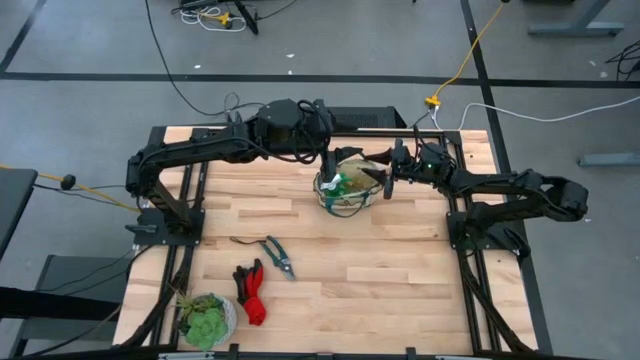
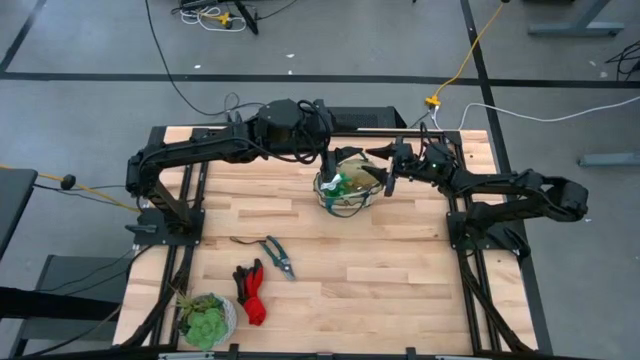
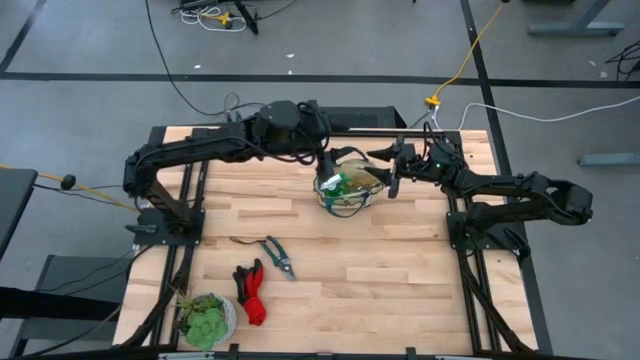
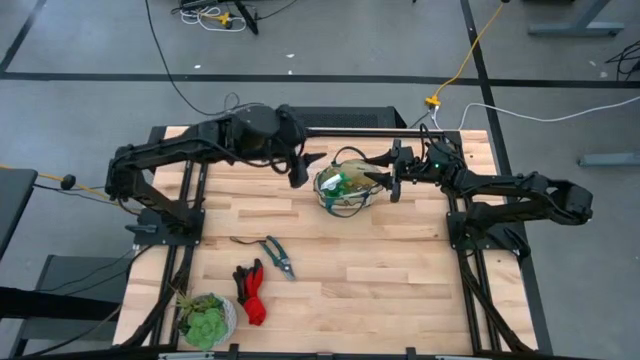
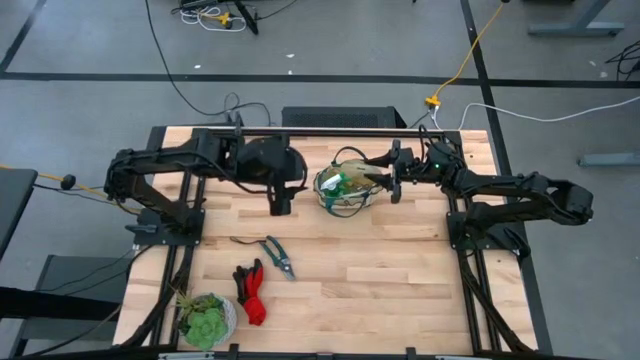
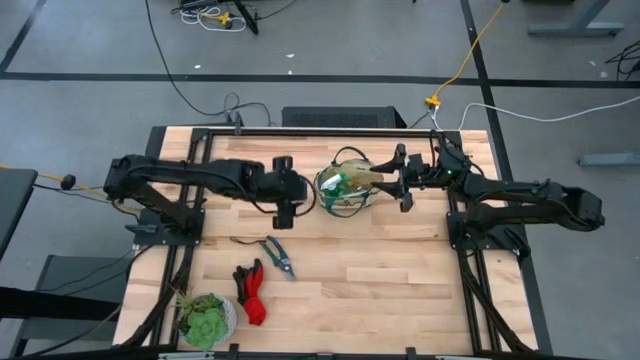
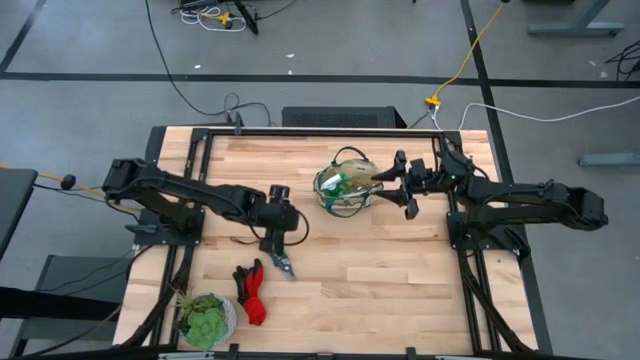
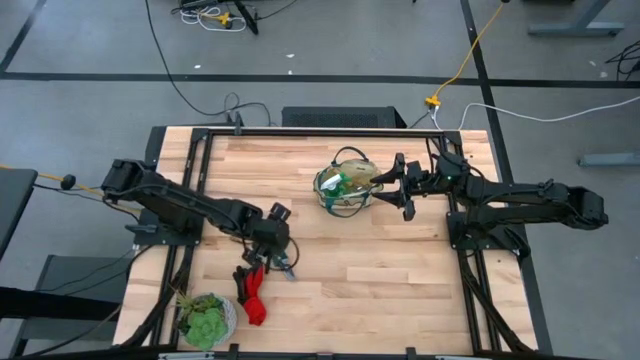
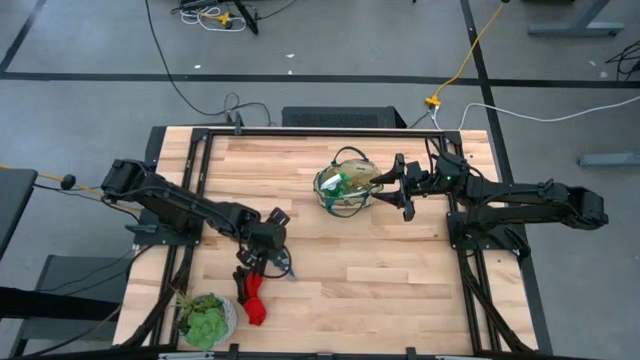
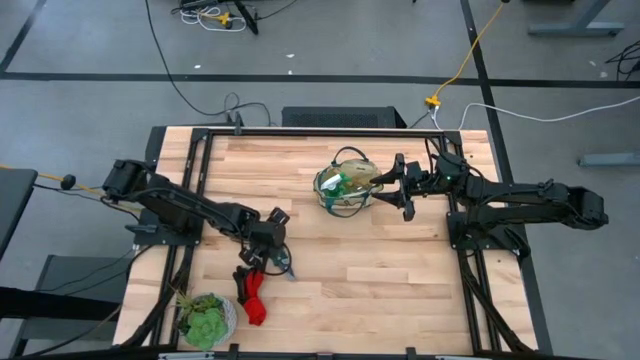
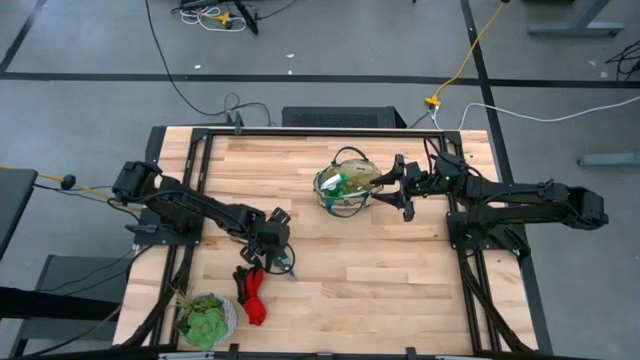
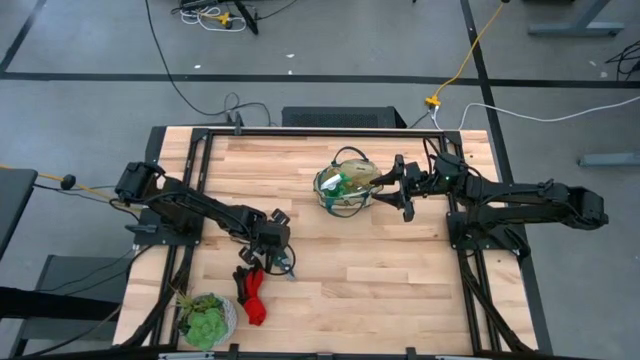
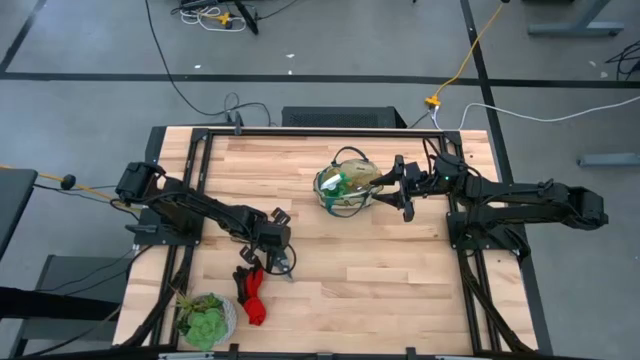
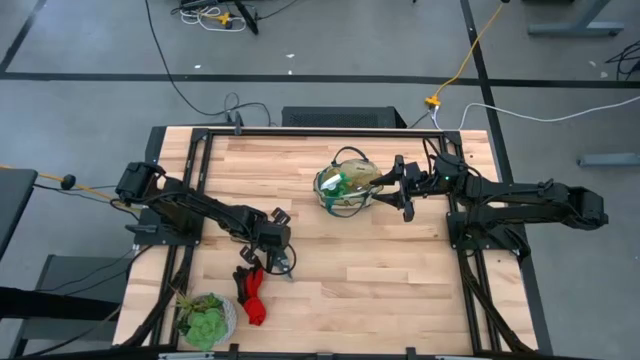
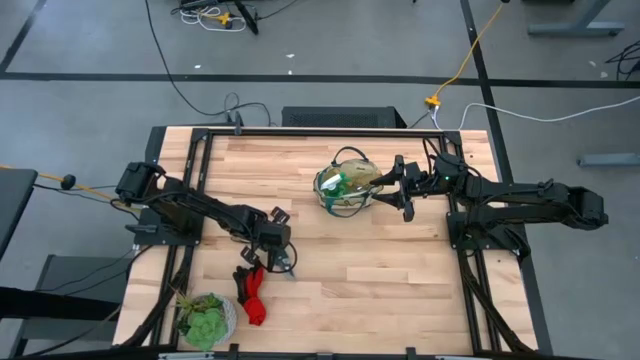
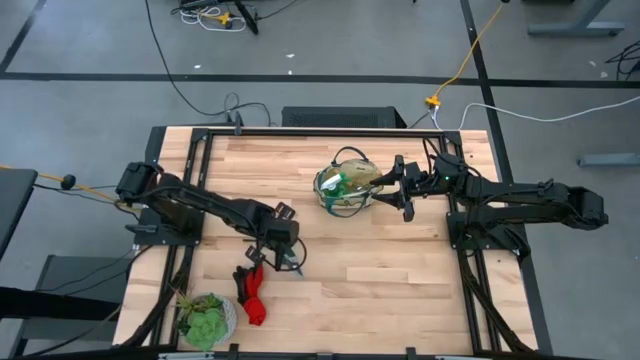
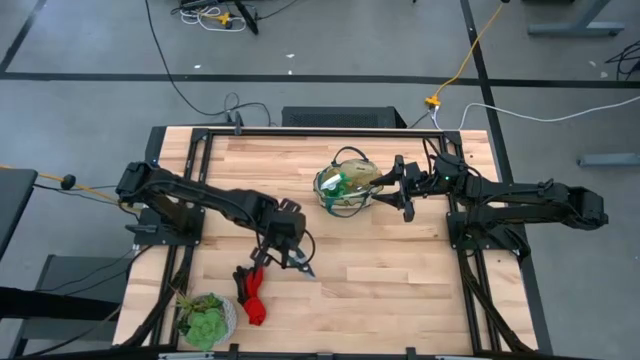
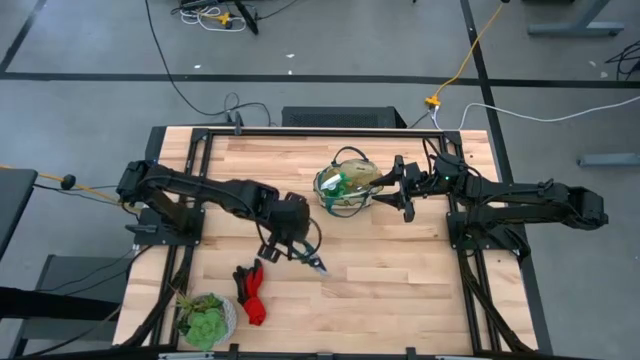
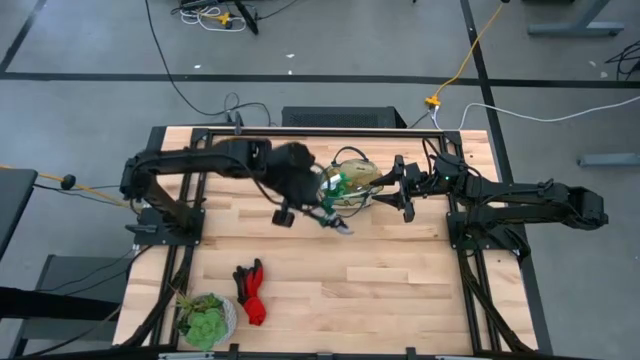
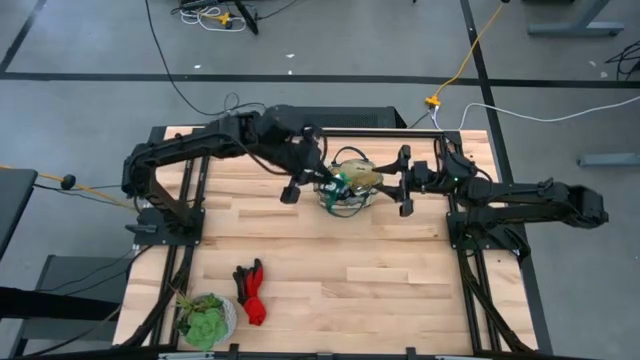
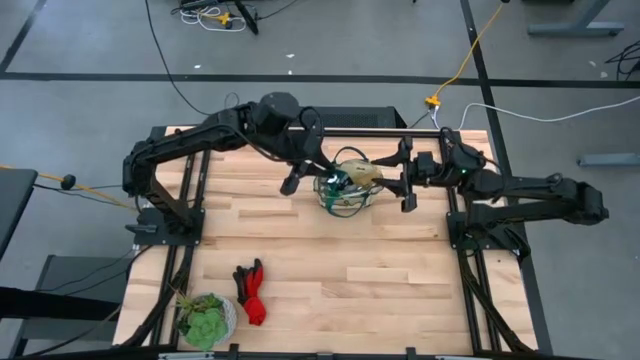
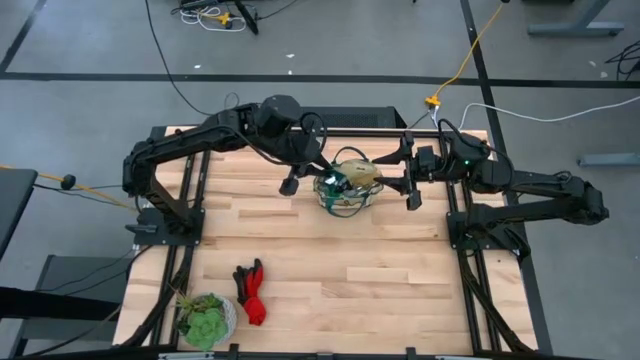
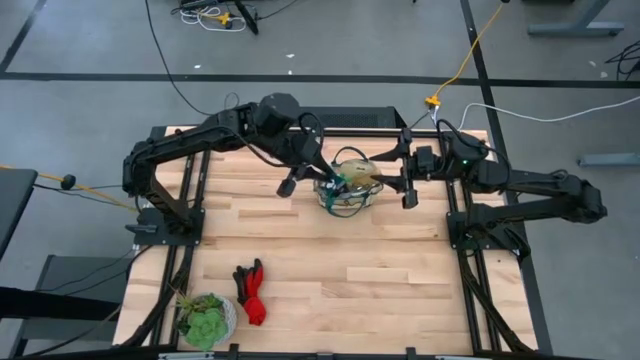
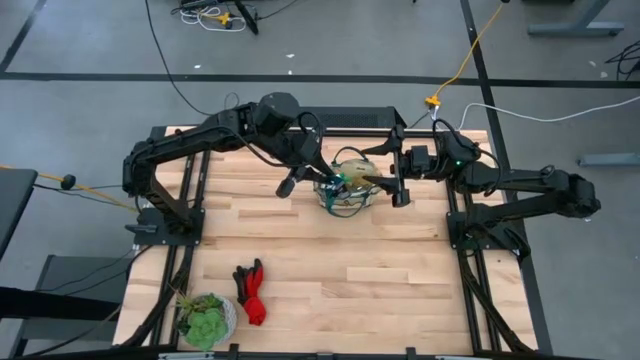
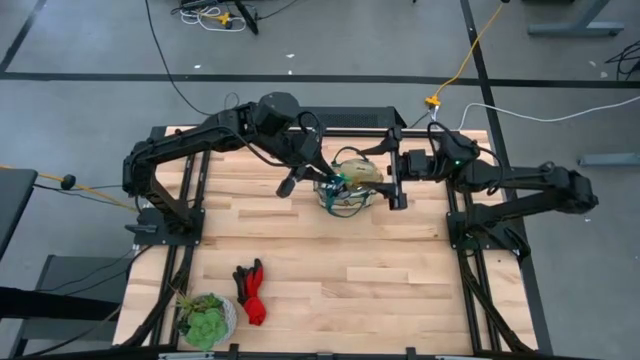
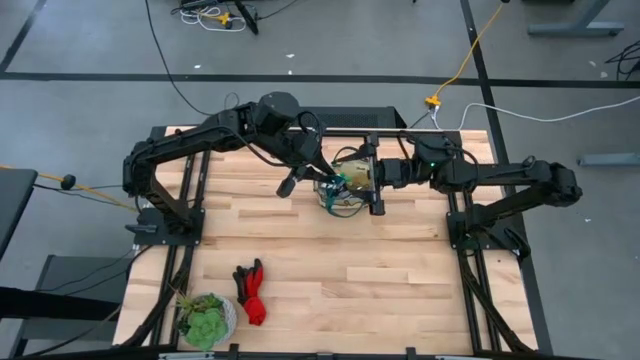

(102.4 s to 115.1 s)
Task: Pick & Place Garden tools in Gardening bag
Put the green shear scissors into the gardening bag

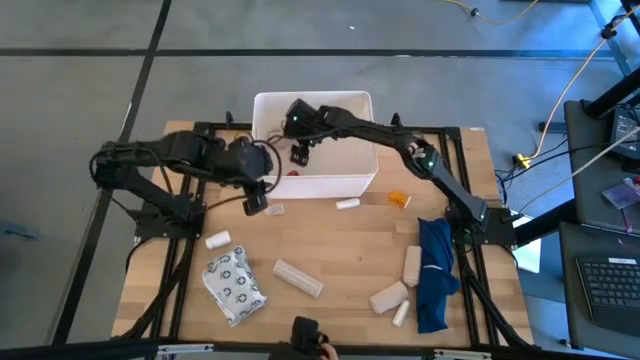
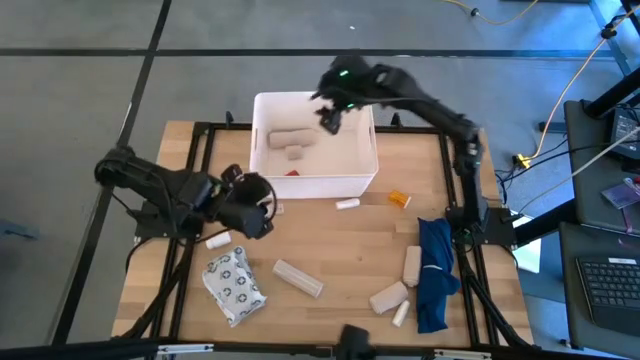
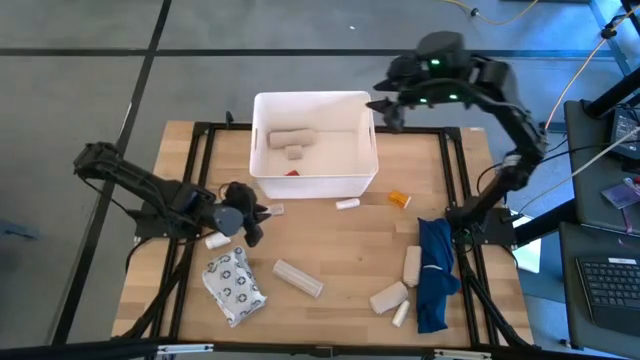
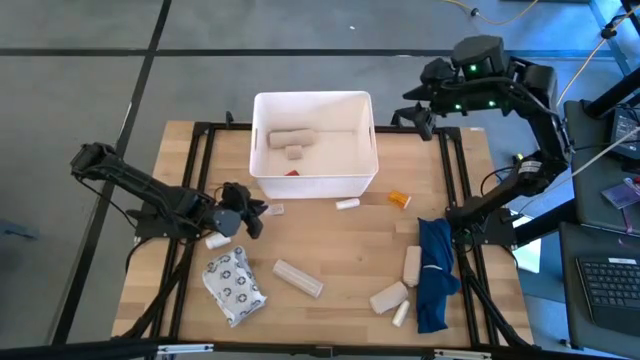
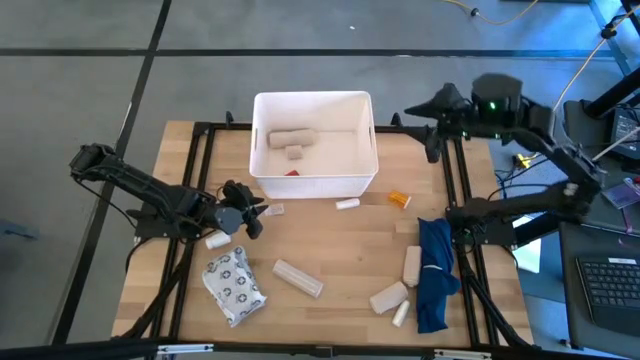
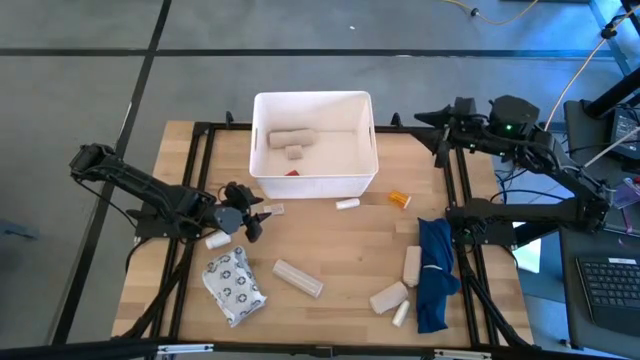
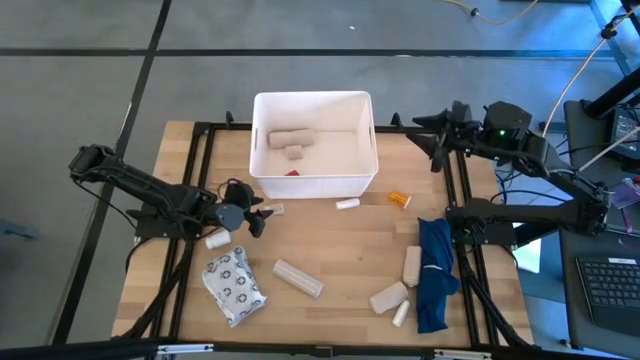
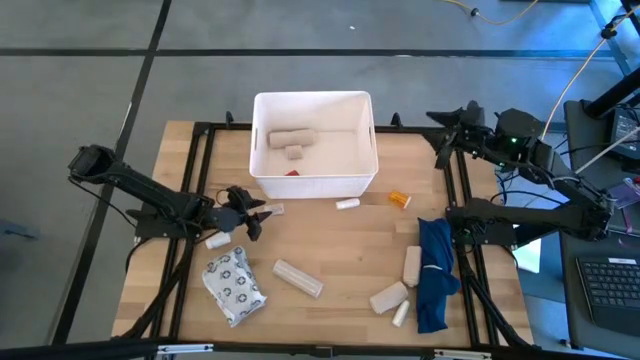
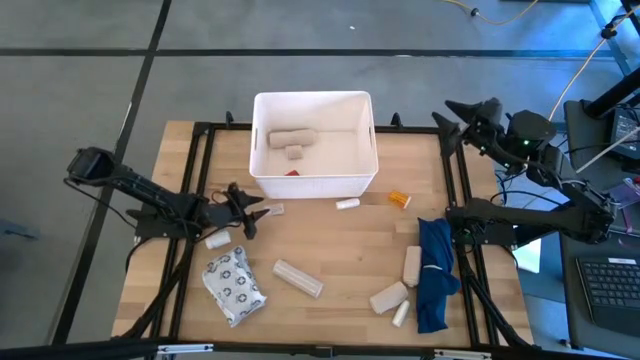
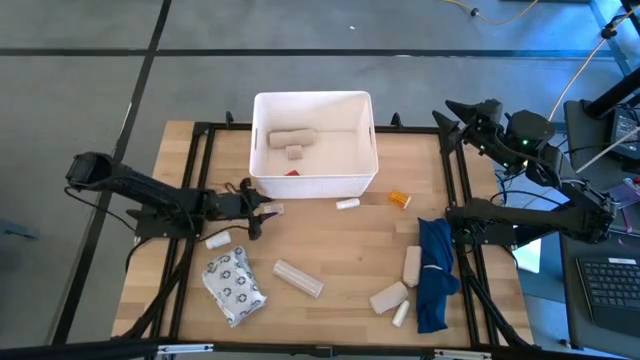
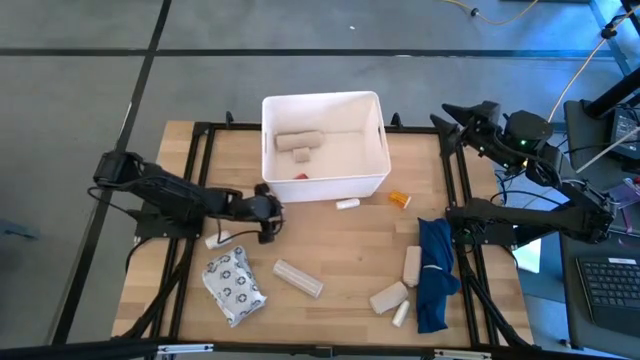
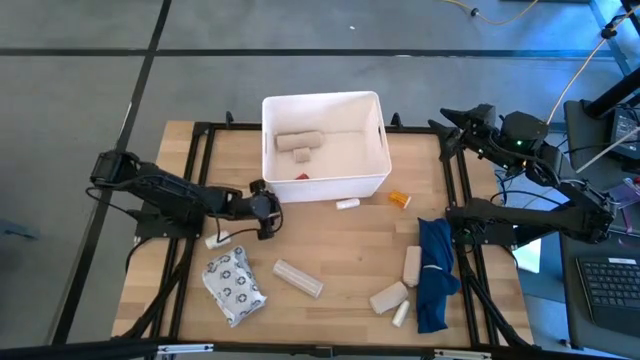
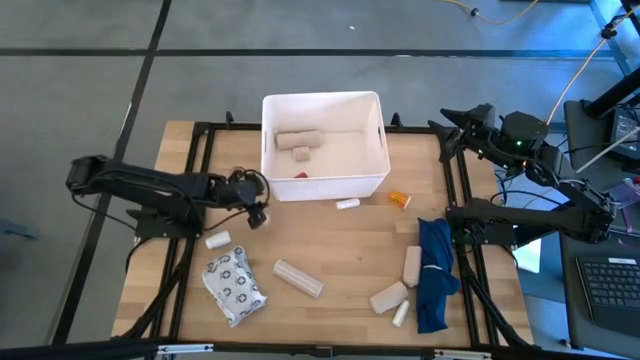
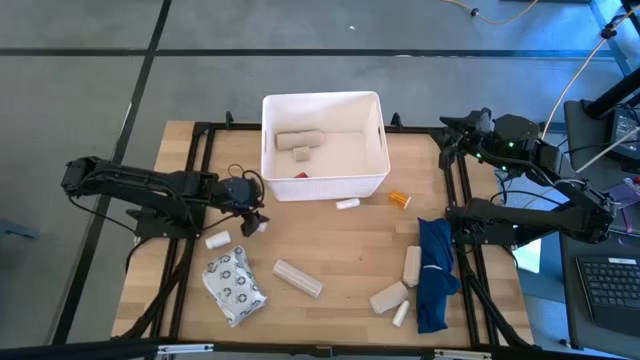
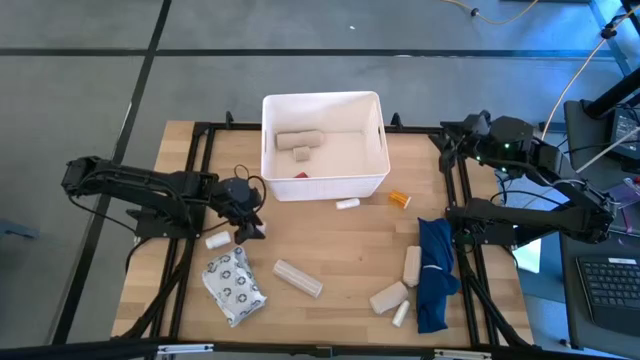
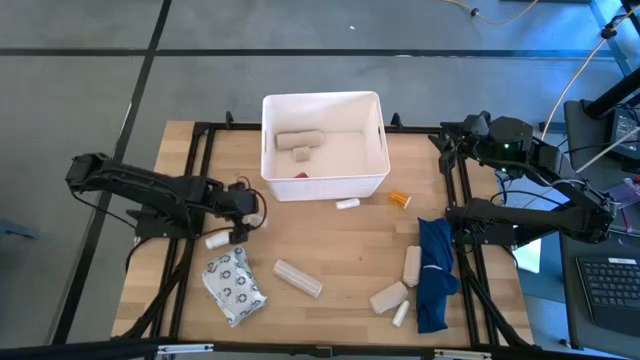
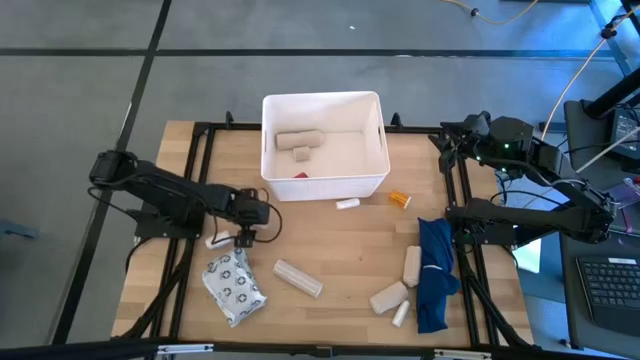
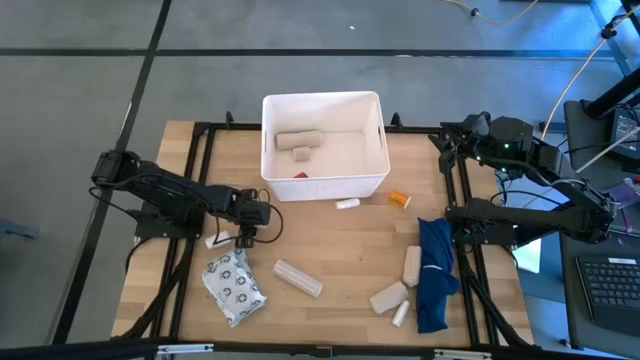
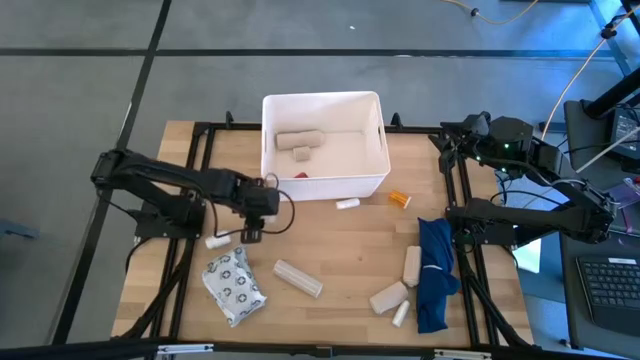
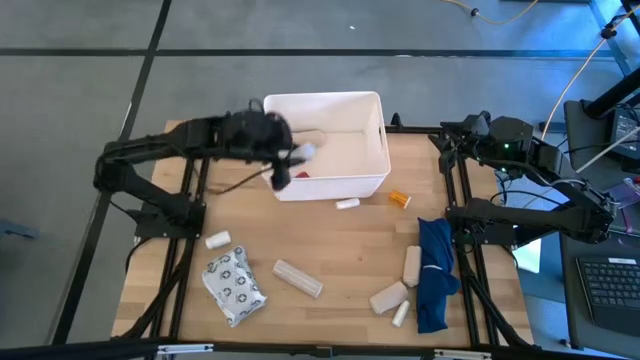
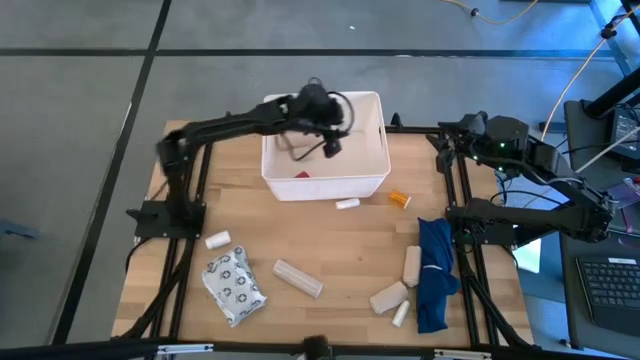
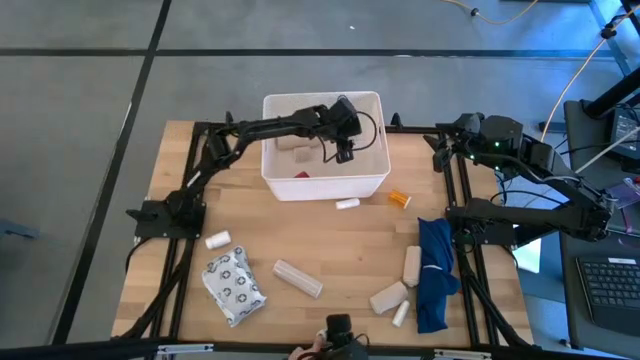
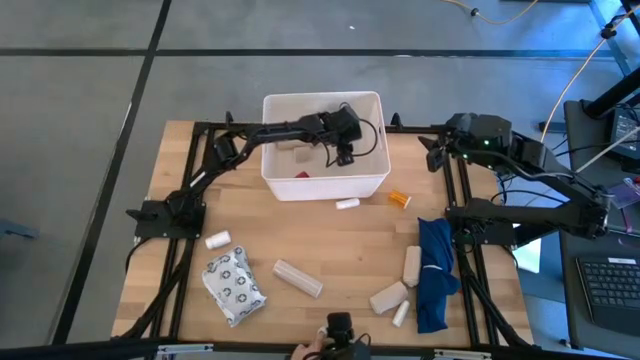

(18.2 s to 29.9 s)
Task: Pick & place medical supplies in basket/bin
Put the transparent pill bottle into the white bin
